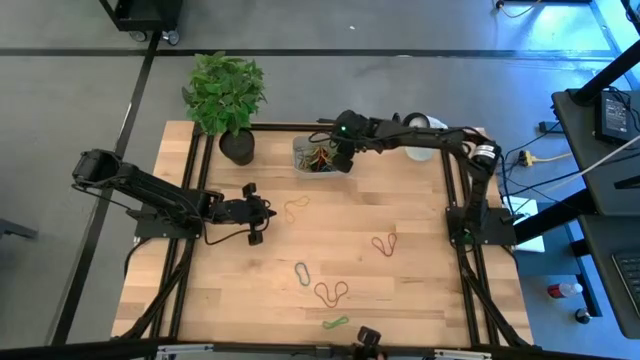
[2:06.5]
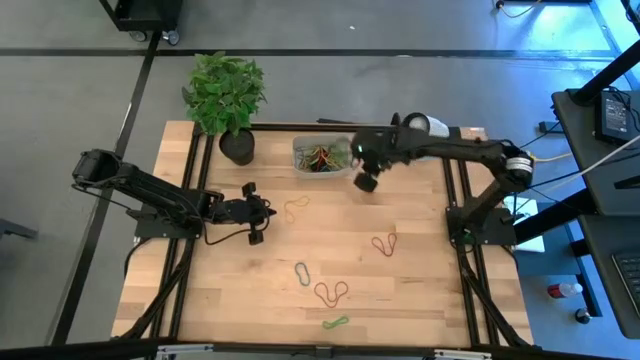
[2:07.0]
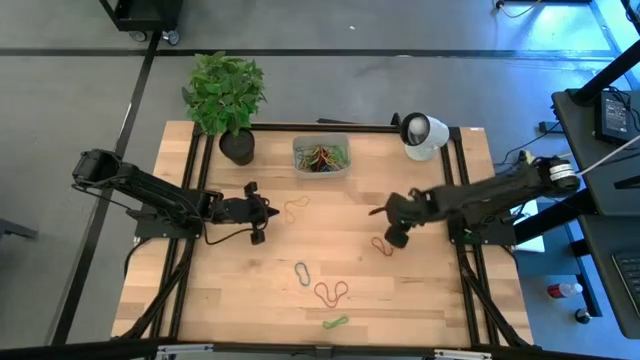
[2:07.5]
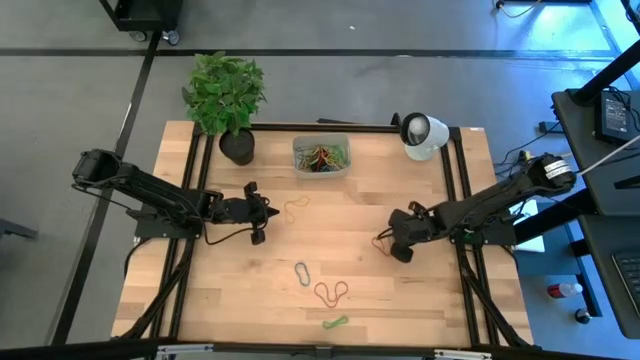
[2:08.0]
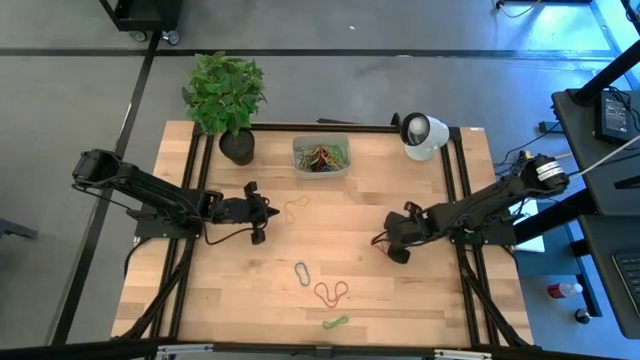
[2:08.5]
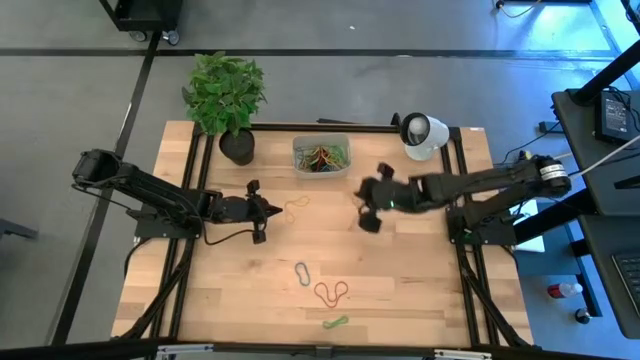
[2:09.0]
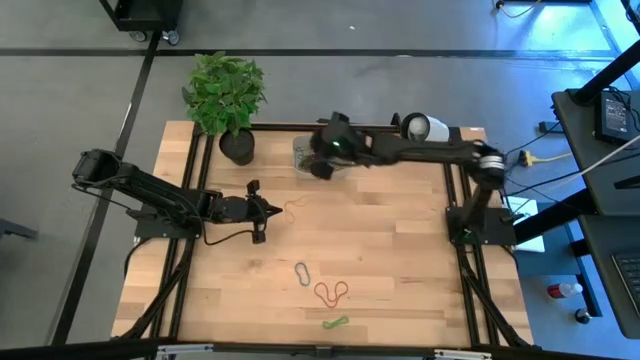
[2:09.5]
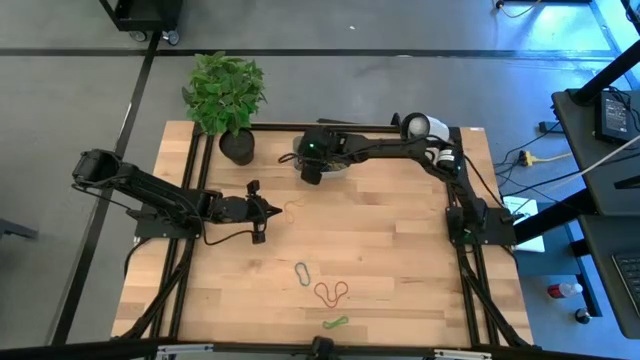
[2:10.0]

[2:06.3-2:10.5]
Task: Pick and place rubber bands into bin
Put the red rubber band into the gray bin

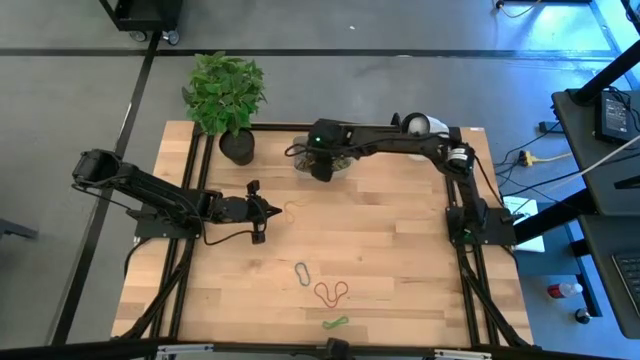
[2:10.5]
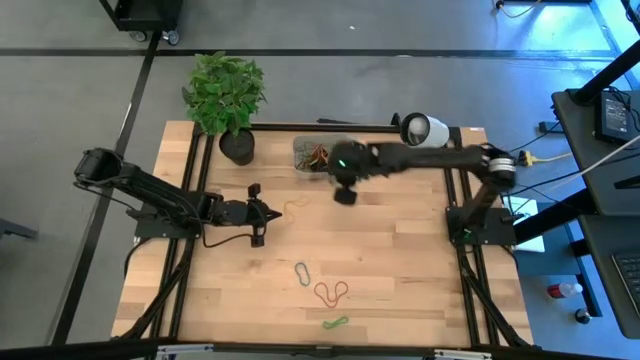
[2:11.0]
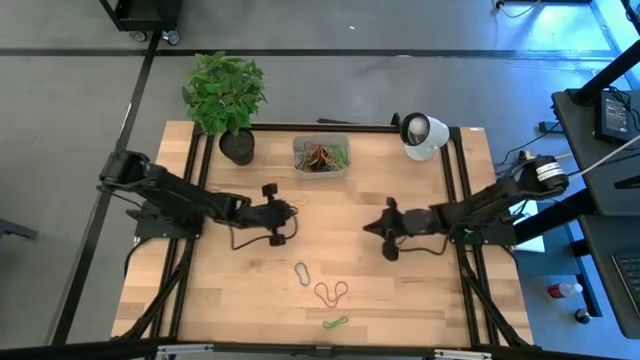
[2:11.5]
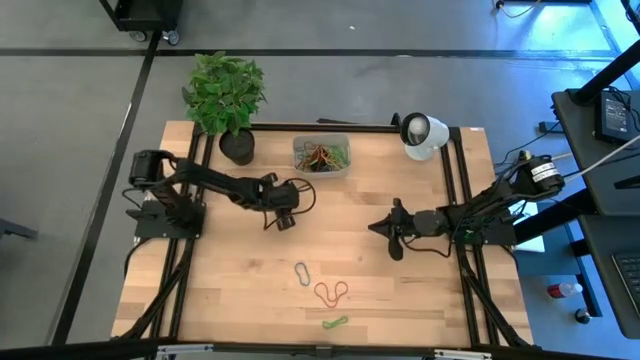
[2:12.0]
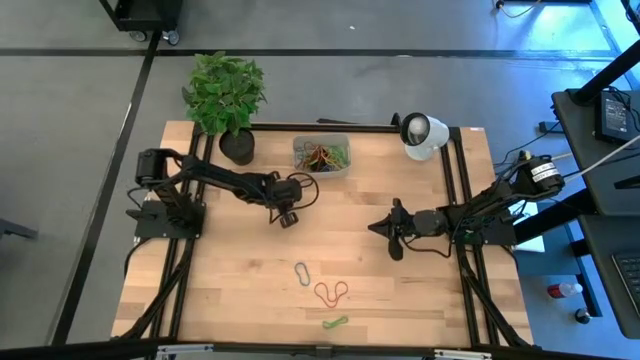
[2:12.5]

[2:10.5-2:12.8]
Put the yellow rubber band into the gray bin

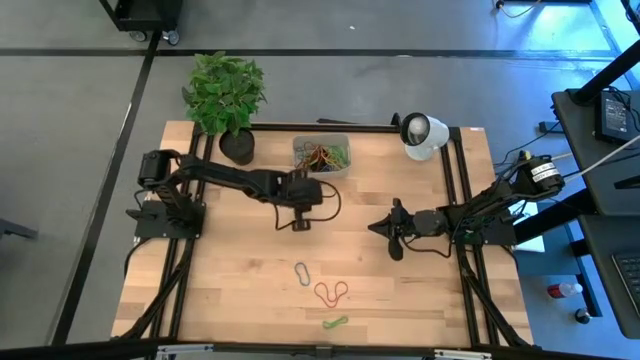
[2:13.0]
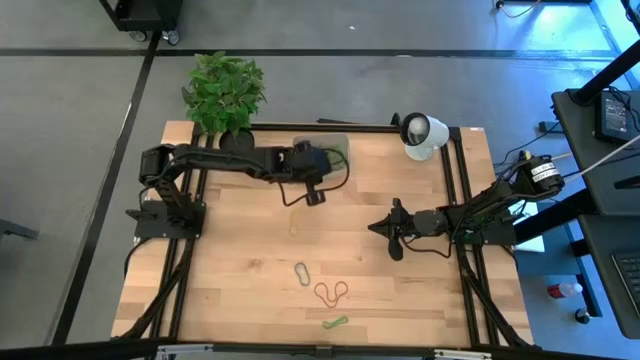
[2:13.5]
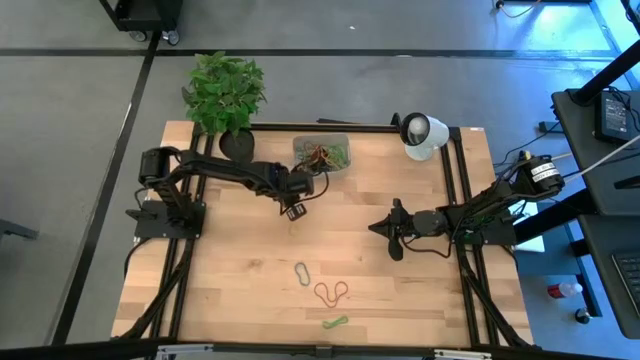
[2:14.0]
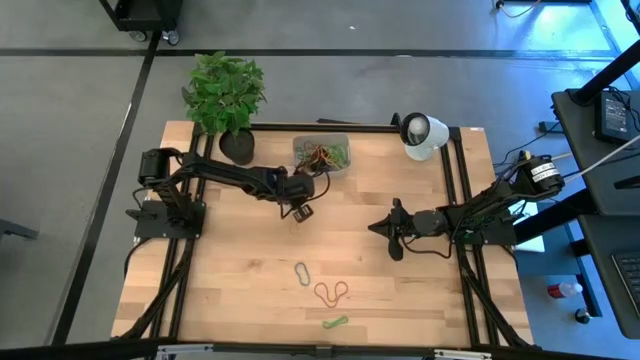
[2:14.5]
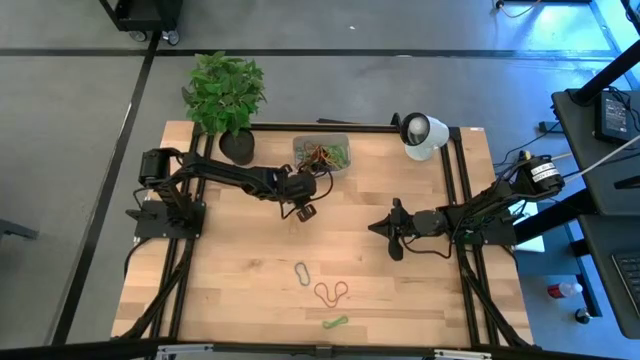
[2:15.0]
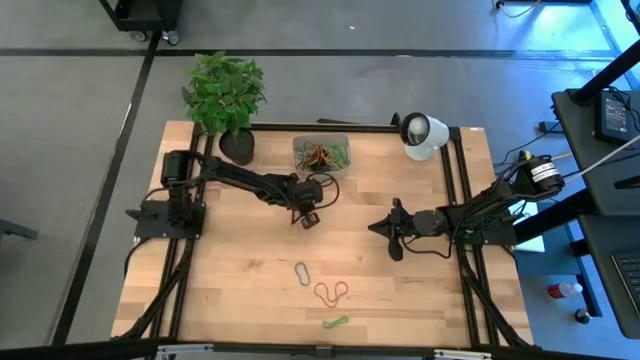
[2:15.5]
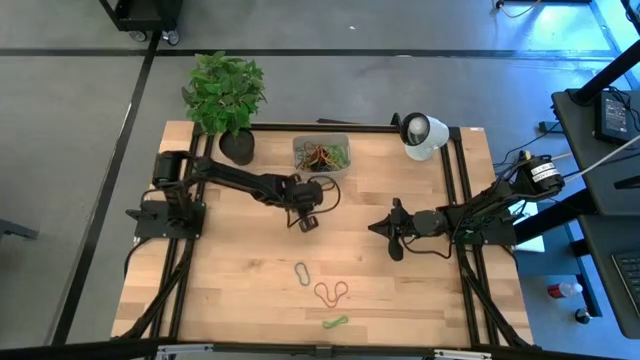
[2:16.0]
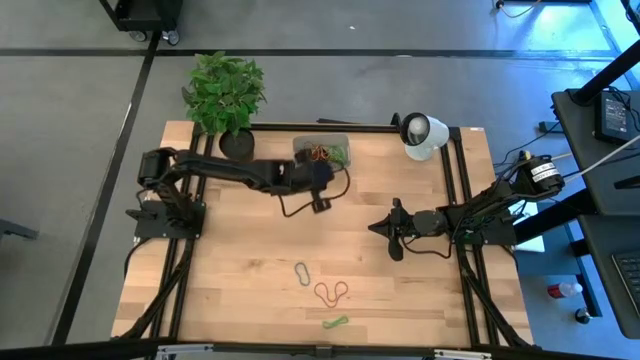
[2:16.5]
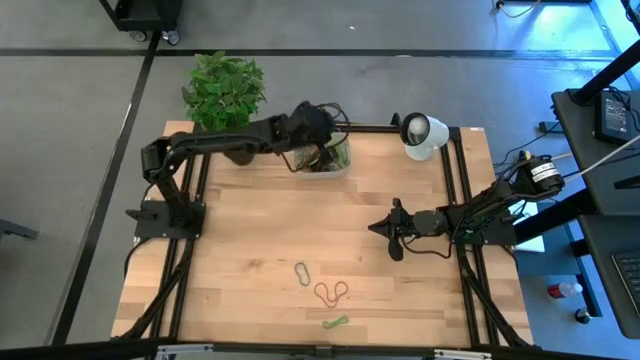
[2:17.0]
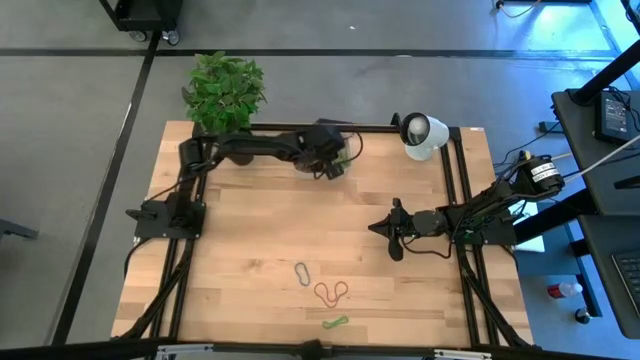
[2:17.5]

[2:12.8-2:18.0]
Put the yellow rubber band into the gray bin

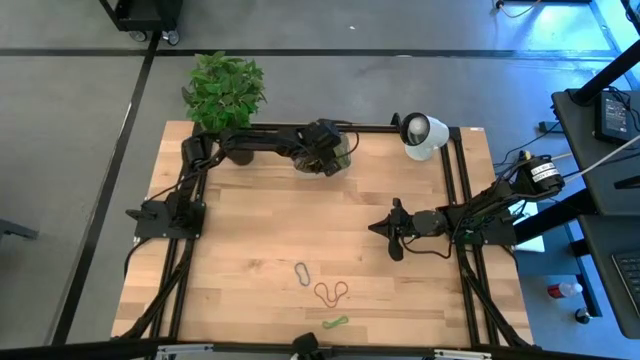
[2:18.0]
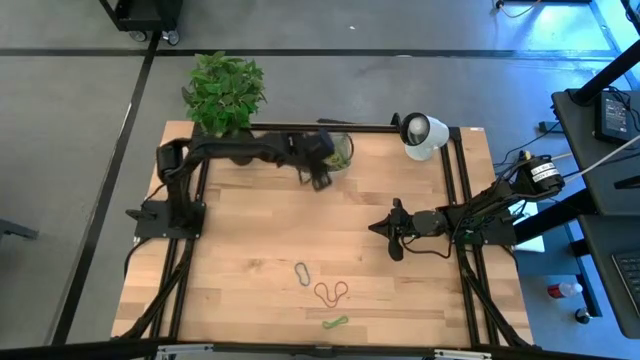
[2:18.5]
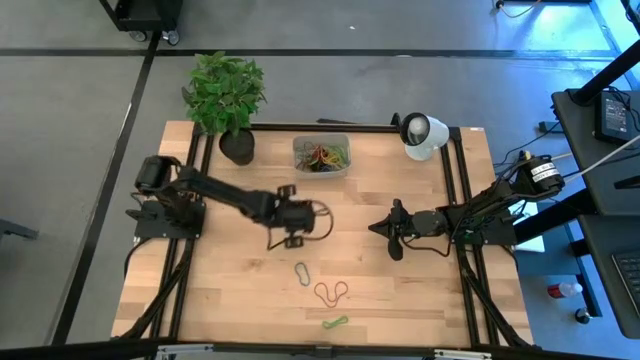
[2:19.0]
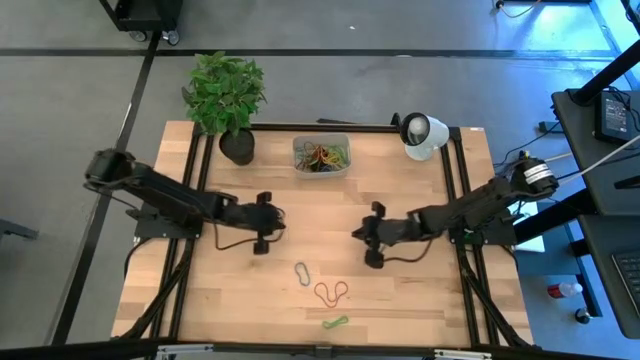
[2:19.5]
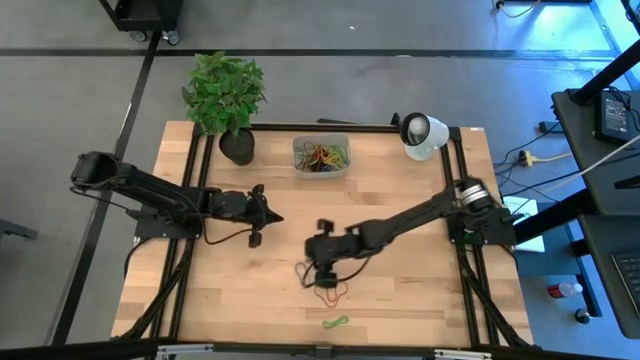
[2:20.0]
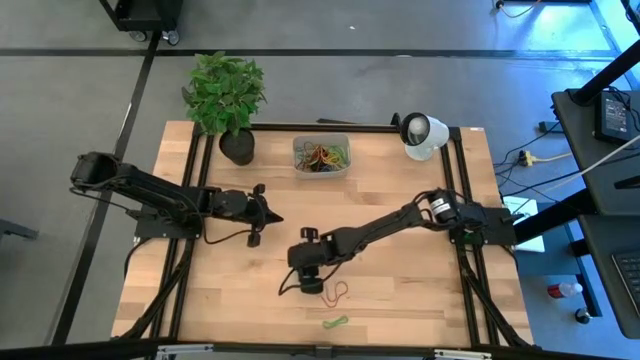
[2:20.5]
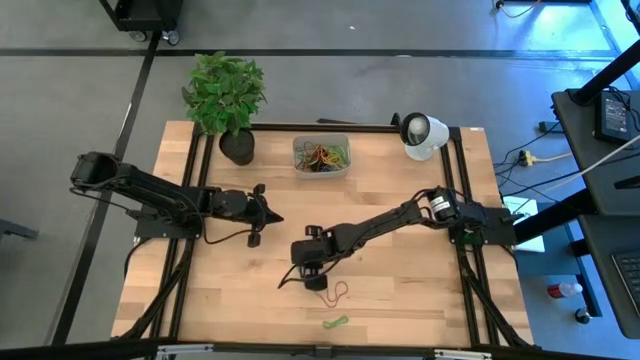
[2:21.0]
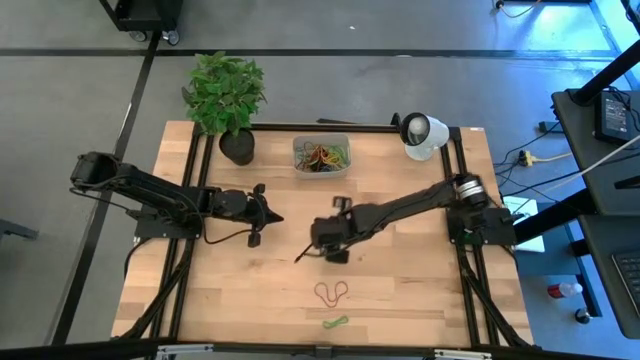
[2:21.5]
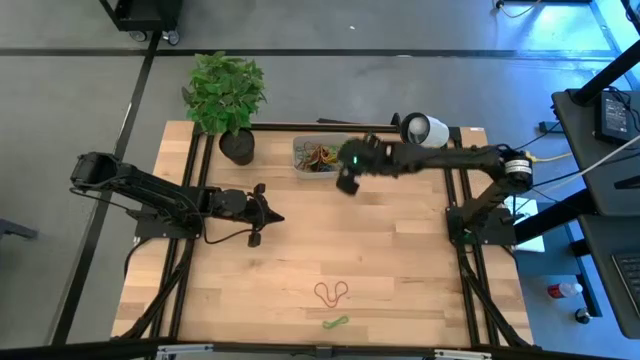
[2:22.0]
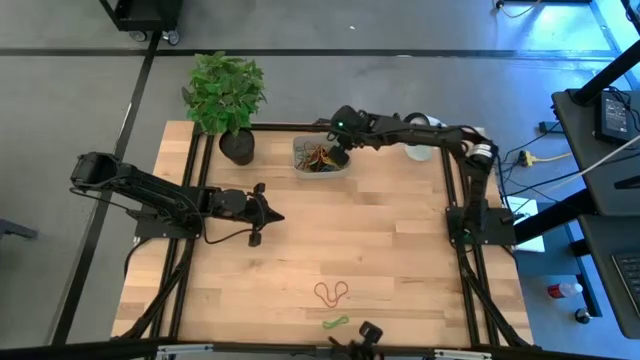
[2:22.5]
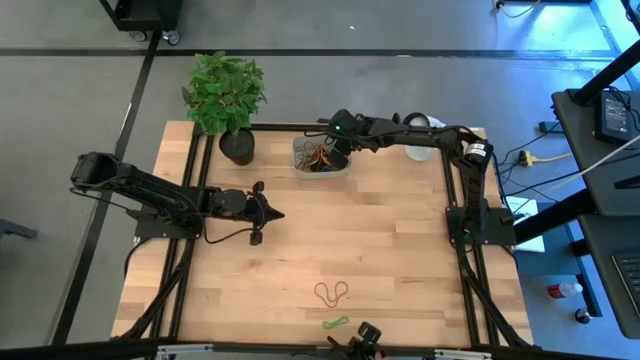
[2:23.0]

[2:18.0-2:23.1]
Put the blue rubber band into the gray bin

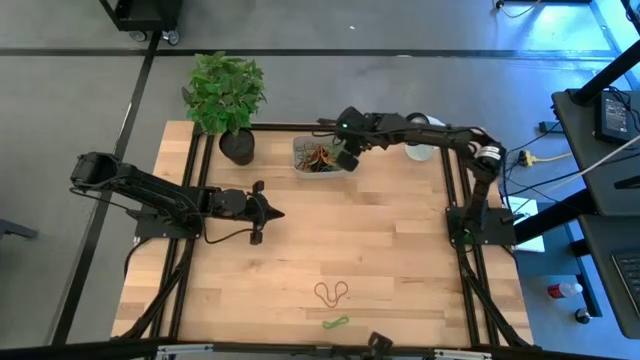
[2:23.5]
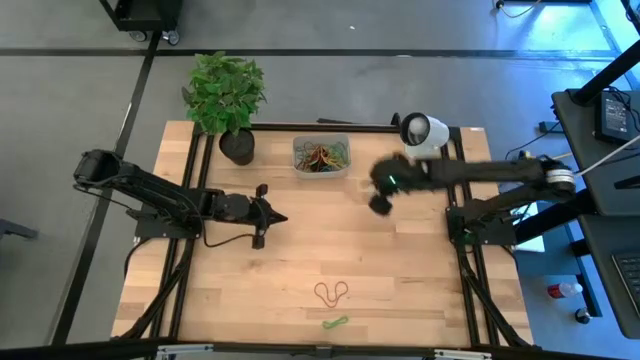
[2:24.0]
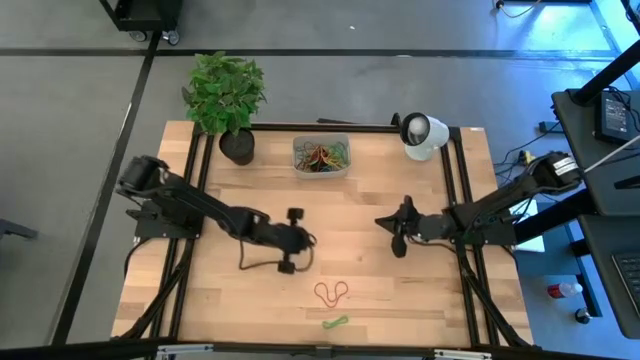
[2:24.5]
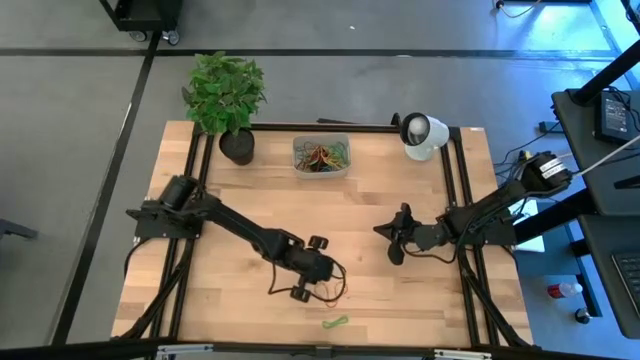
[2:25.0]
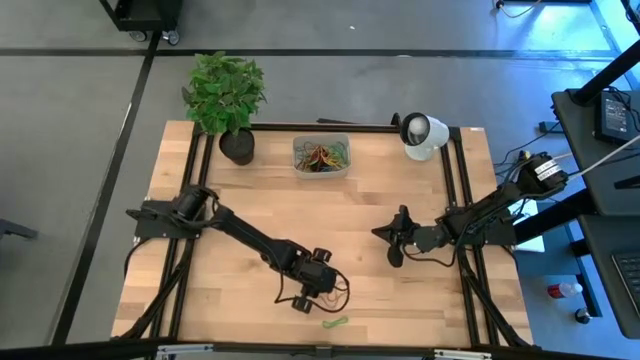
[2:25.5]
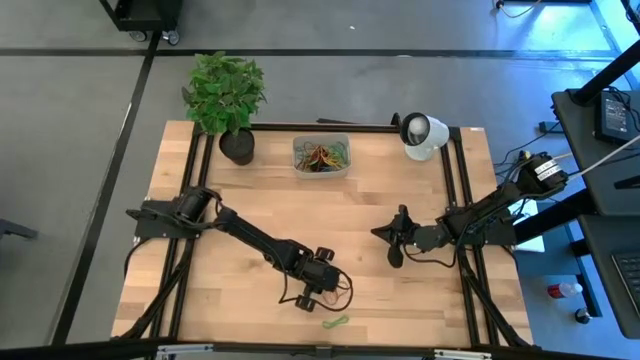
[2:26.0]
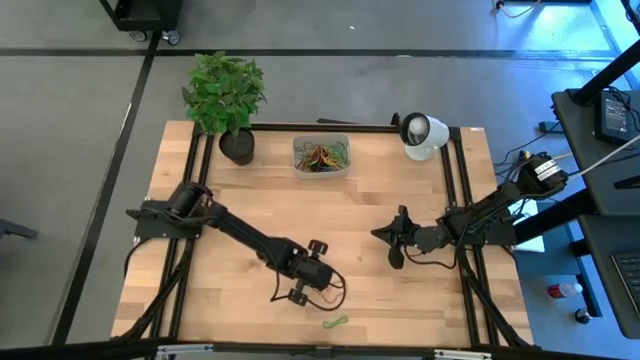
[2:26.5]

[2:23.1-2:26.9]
Put the red rubber band into the gray bin

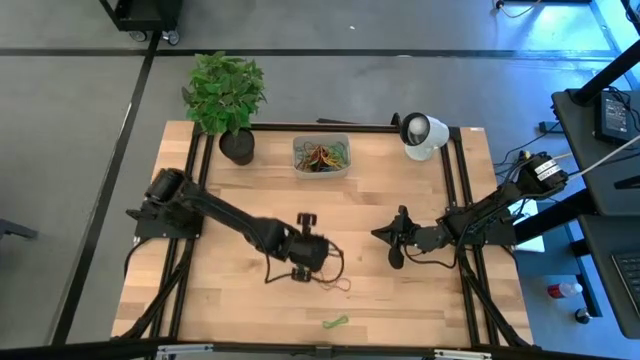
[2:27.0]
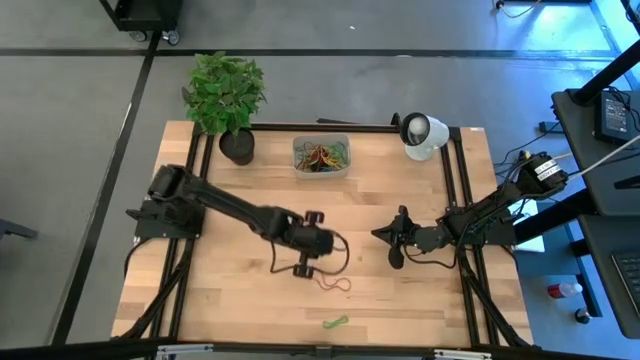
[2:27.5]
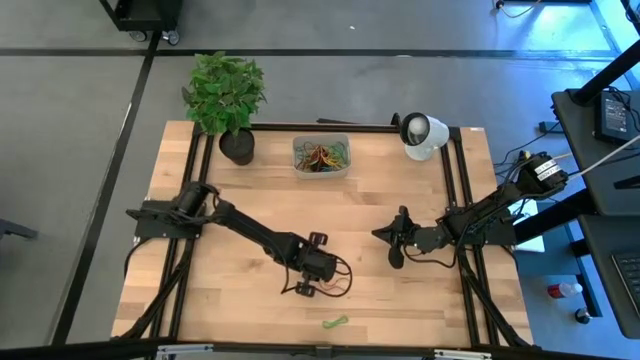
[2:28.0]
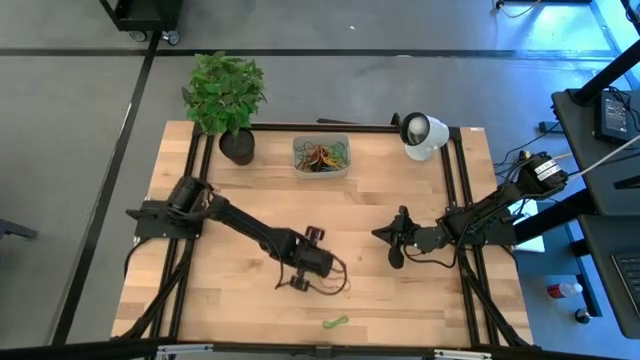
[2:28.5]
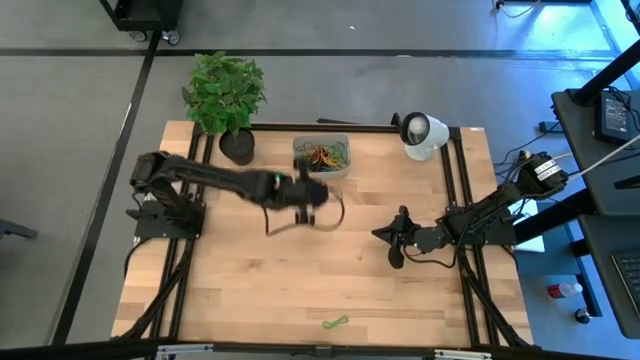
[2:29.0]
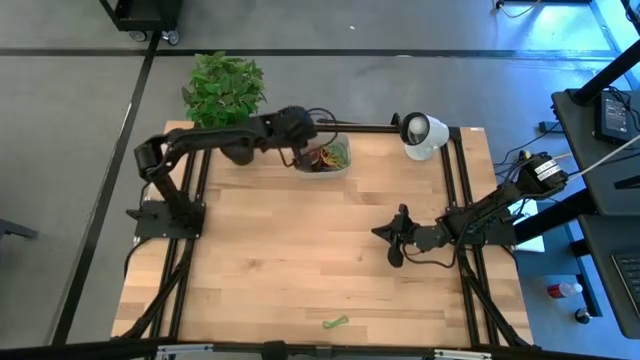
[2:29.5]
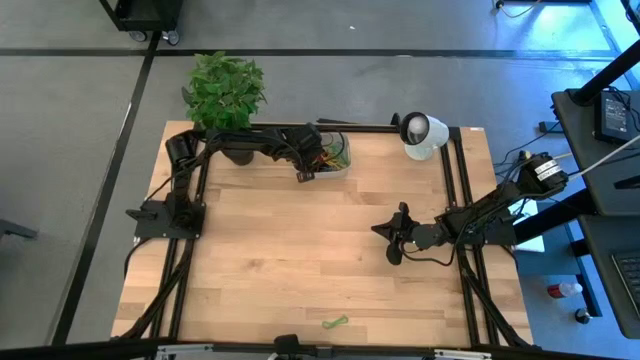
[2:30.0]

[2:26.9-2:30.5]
Put the red rubber band into the gray bin
